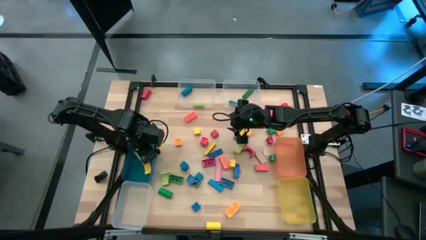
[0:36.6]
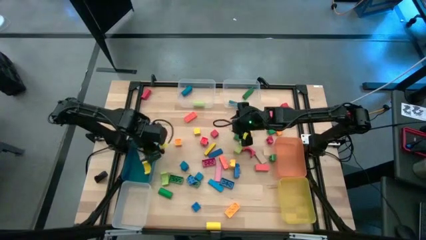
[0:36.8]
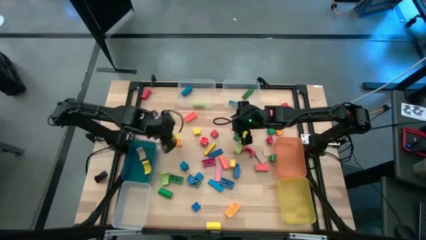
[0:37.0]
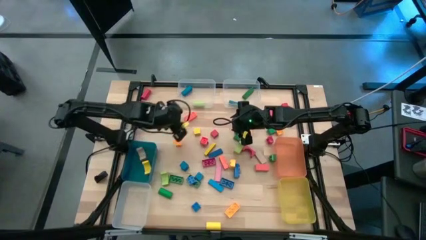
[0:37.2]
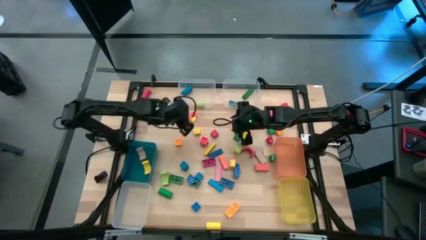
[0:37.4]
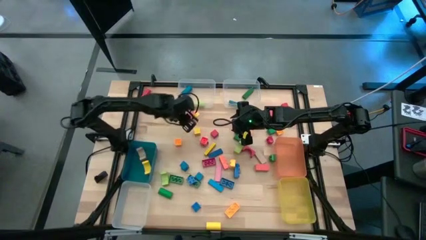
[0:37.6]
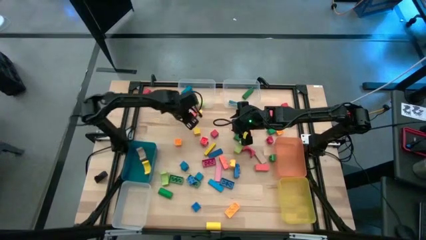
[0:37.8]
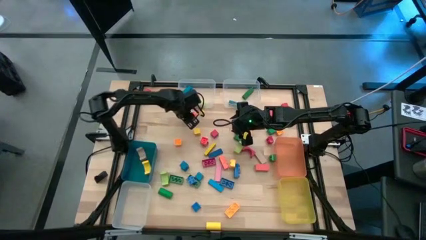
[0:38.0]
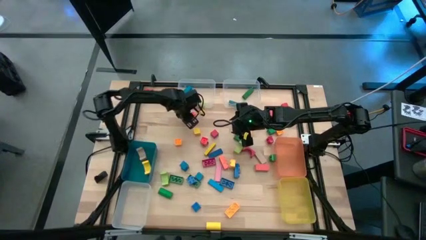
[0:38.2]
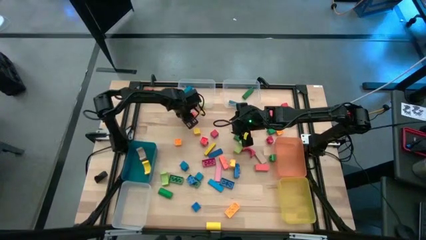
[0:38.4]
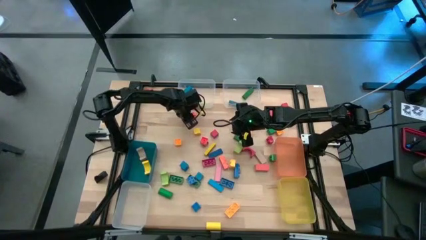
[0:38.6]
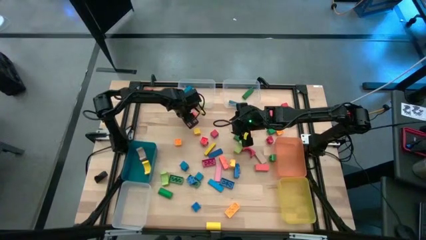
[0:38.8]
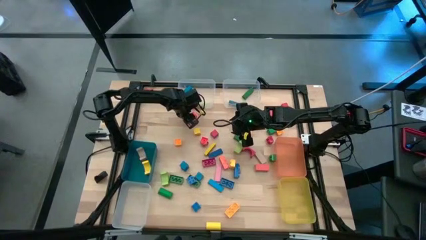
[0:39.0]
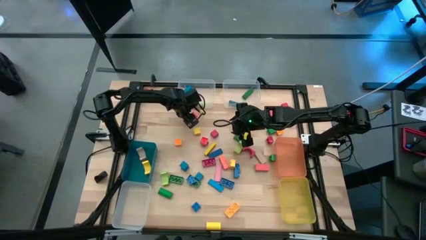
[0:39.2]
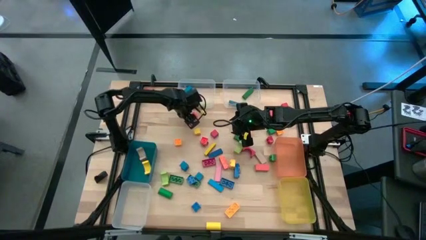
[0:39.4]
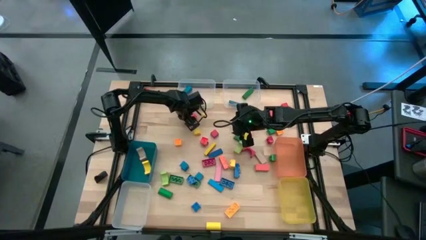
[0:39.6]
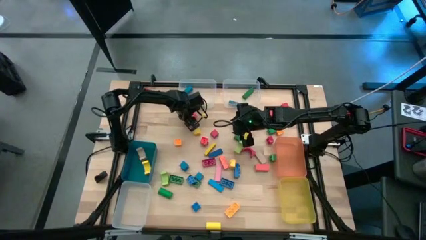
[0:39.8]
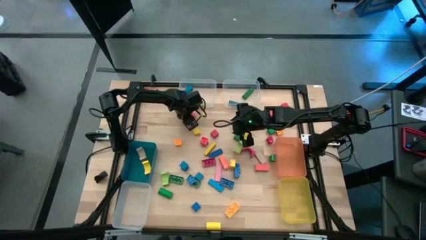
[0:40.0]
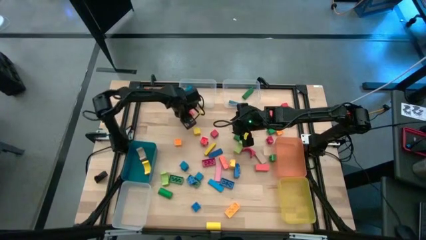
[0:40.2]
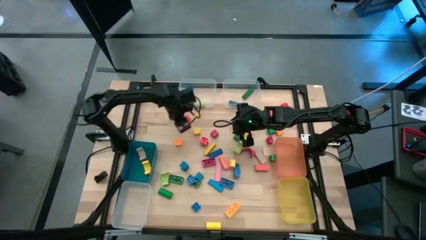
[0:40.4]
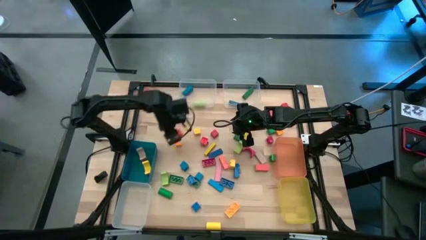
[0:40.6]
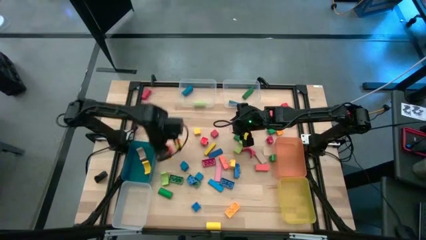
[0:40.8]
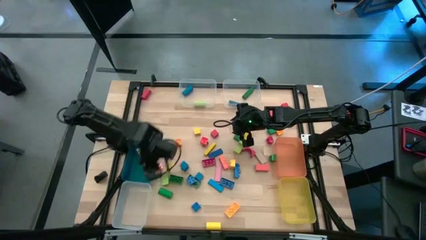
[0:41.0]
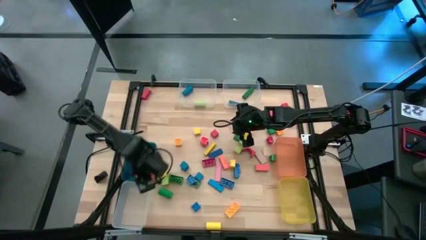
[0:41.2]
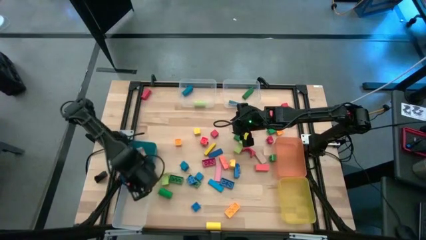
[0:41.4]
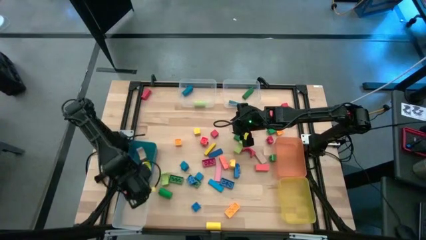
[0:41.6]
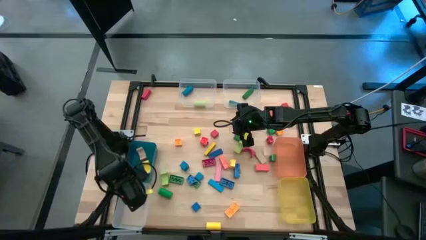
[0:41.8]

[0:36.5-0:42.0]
Task: Sort blocks by size
Put the orange game piece into the bottom left transparent bin

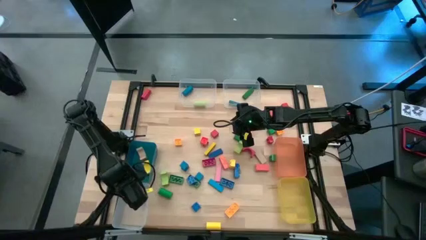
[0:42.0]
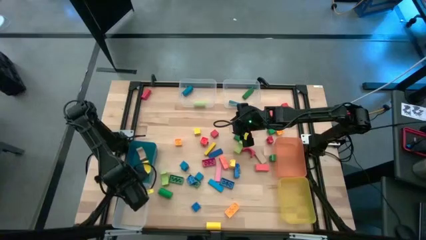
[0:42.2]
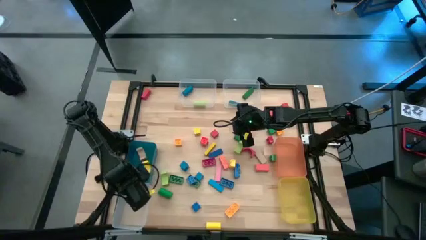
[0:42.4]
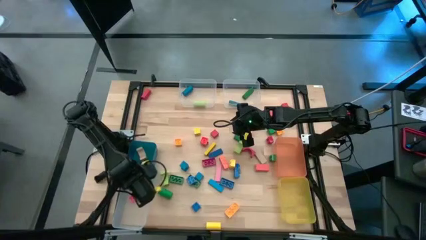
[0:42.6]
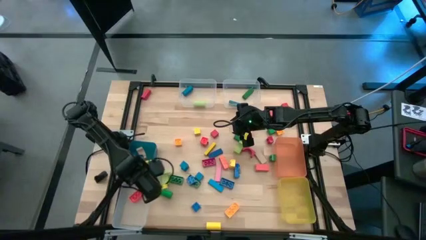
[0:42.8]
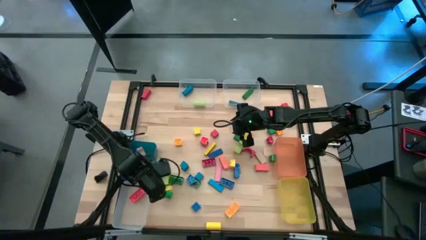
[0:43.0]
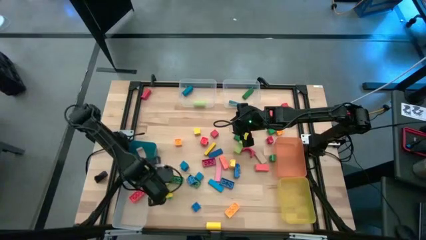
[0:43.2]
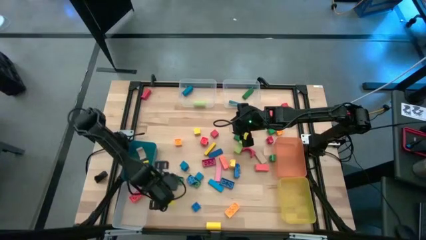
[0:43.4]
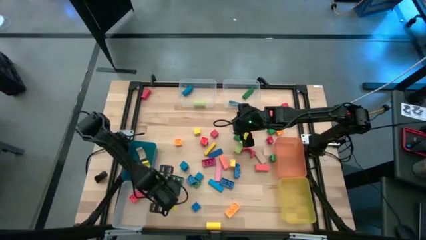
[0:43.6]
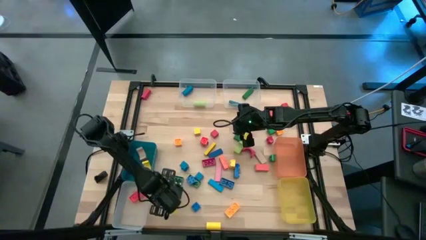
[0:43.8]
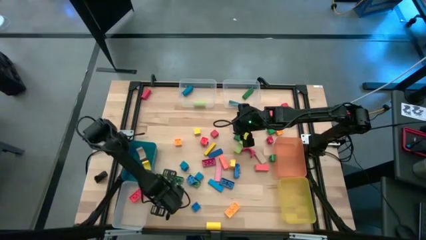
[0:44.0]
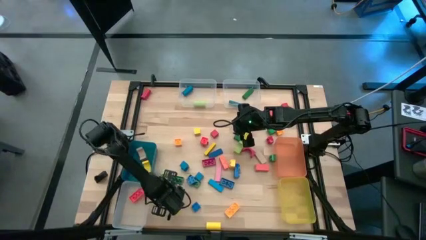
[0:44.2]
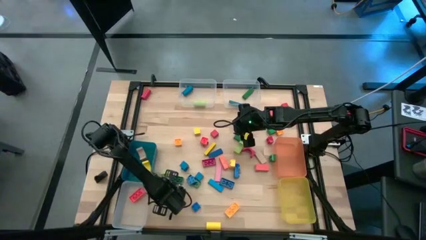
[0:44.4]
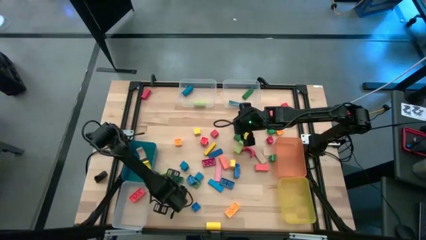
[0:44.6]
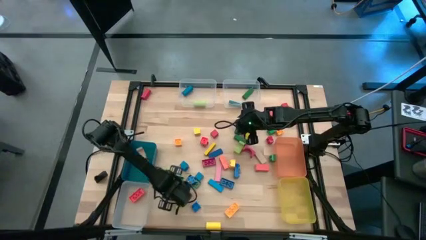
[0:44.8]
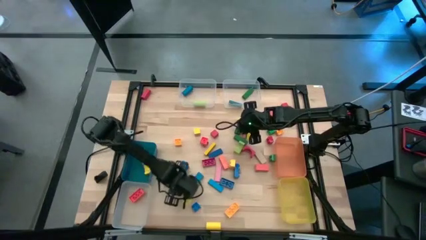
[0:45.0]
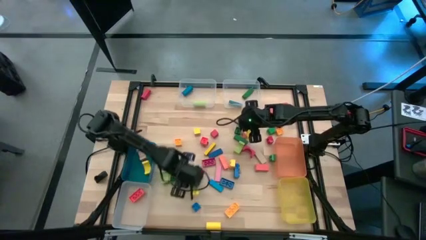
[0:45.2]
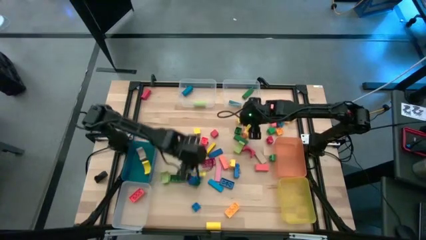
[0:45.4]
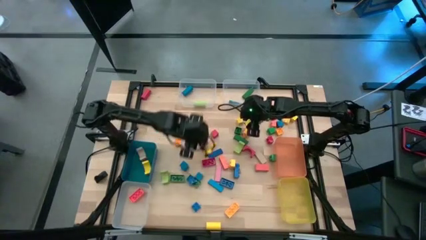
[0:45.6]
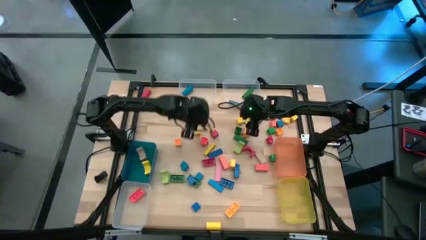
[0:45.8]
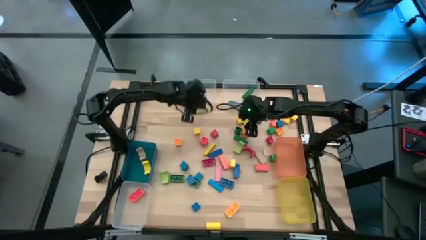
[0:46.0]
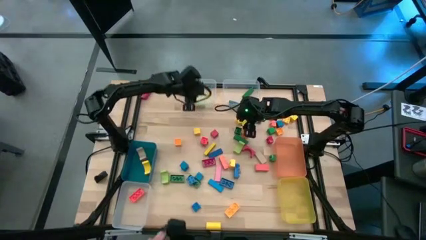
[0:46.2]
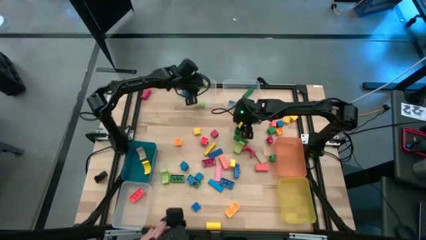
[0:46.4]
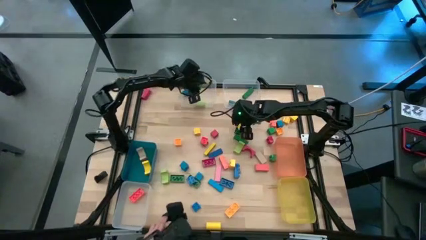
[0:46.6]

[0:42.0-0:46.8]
Put the green block into the top left transparent bin

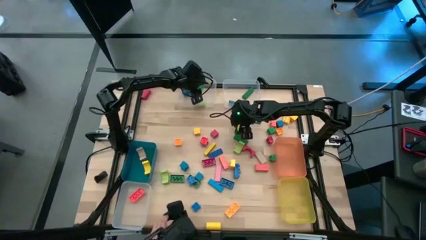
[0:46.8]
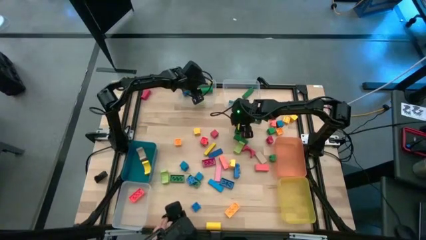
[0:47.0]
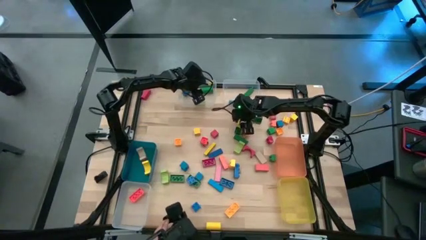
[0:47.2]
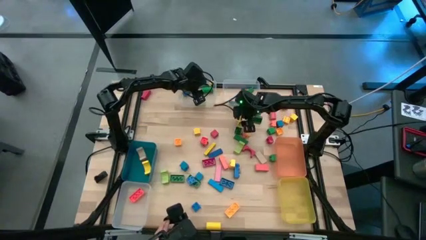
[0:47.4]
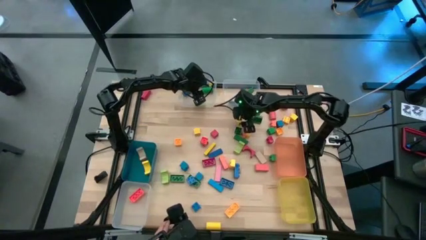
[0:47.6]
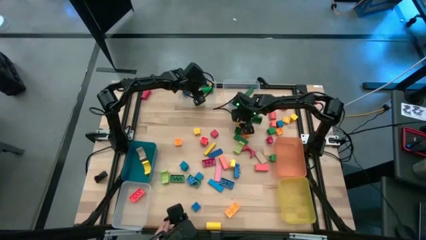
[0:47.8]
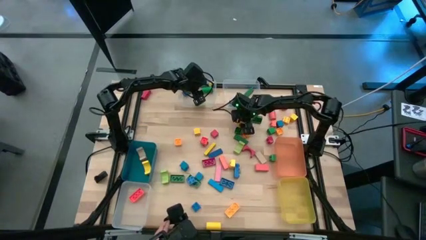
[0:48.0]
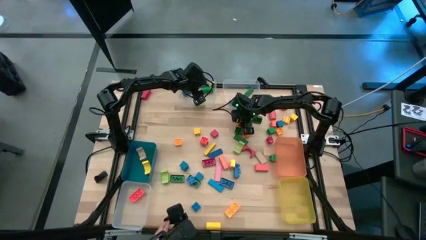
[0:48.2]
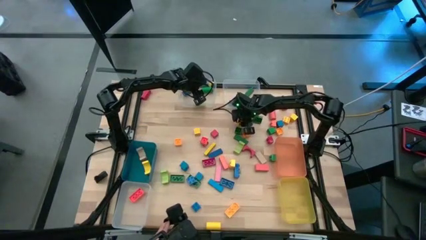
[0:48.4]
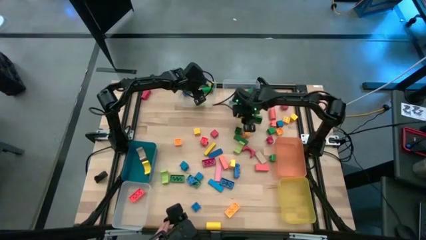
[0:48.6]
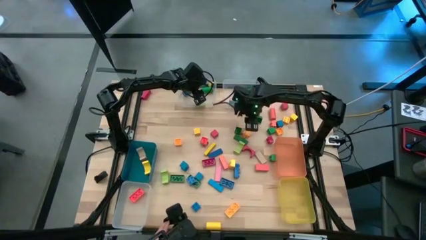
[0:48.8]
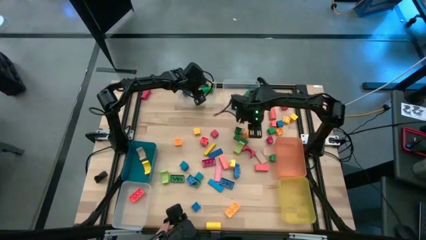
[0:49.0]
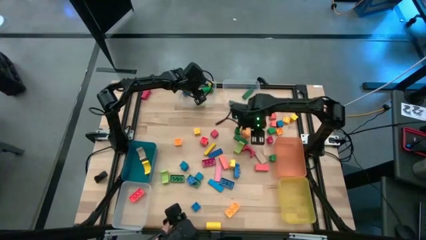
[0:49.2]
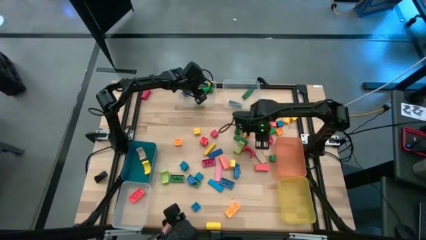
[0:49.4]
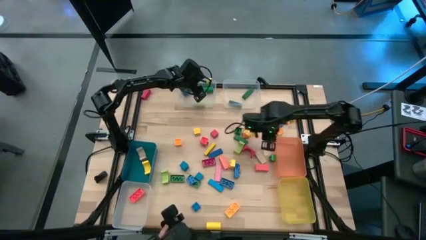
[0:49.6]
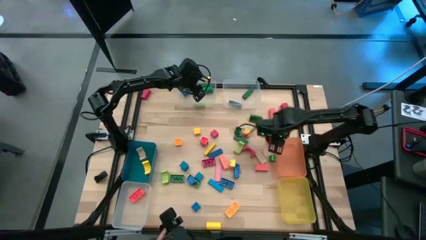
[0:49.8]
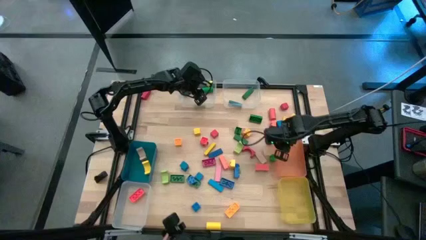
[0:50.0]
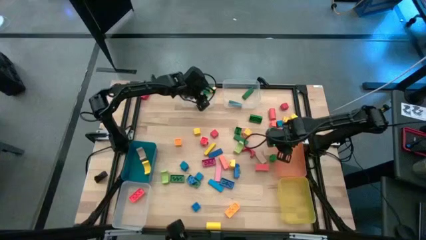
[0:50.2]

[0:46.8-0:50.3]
Put the yellow block into the orange bin

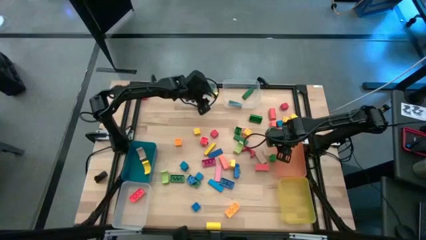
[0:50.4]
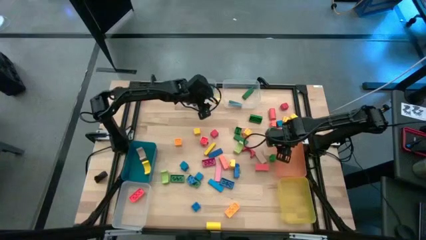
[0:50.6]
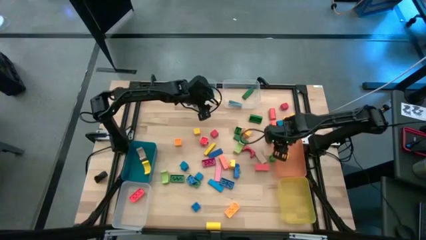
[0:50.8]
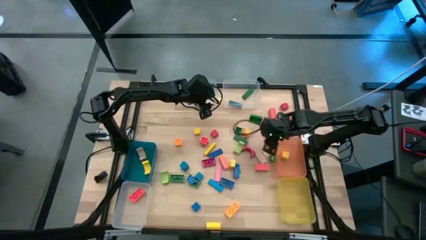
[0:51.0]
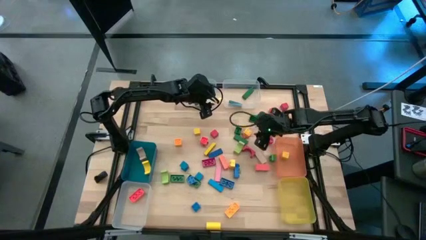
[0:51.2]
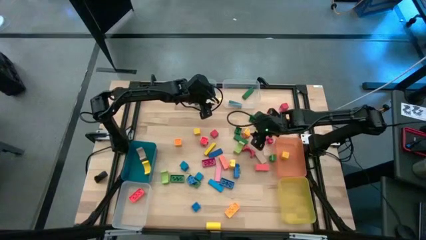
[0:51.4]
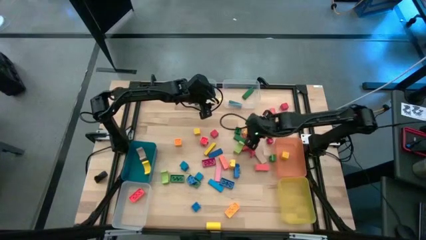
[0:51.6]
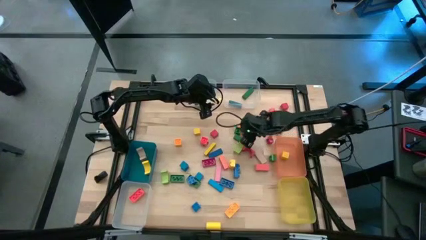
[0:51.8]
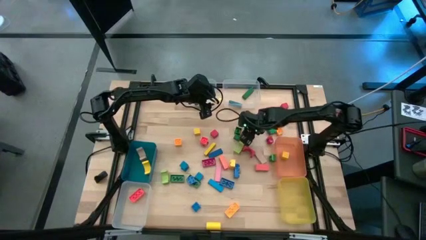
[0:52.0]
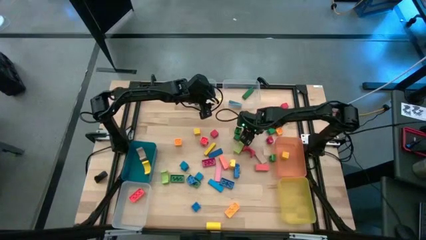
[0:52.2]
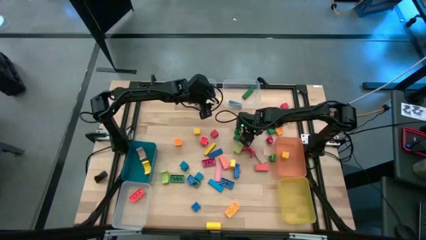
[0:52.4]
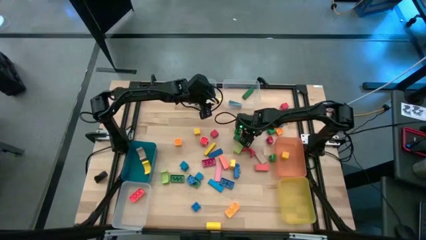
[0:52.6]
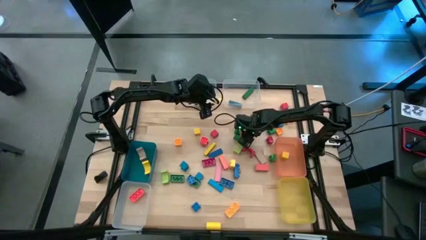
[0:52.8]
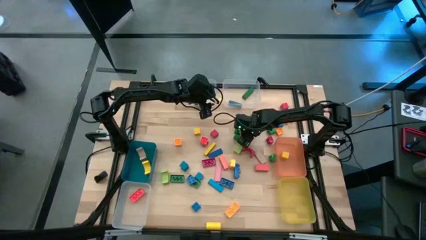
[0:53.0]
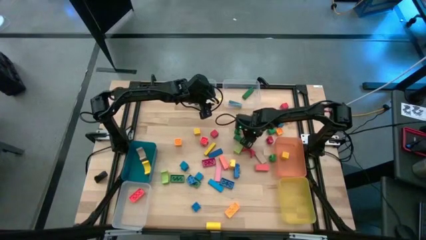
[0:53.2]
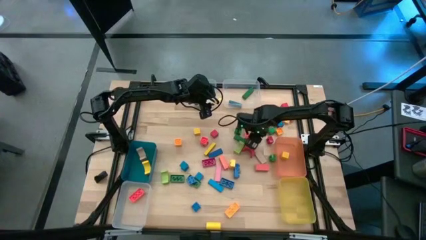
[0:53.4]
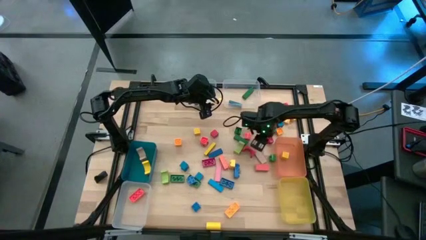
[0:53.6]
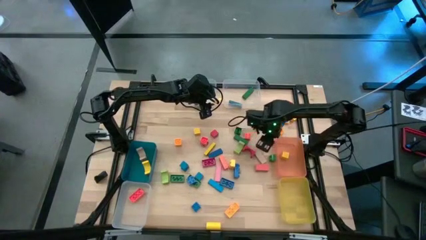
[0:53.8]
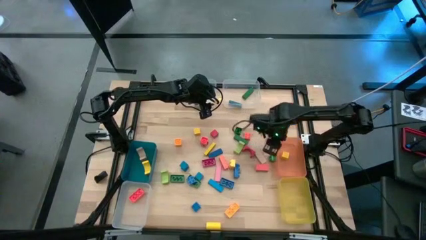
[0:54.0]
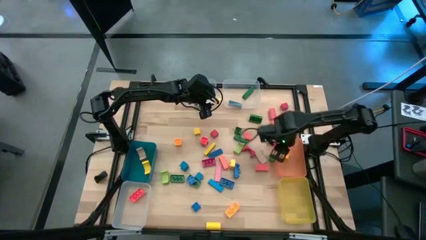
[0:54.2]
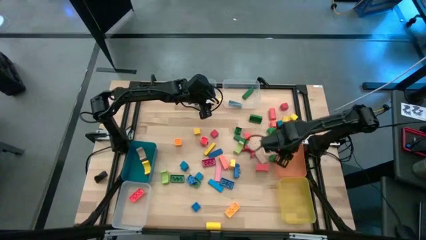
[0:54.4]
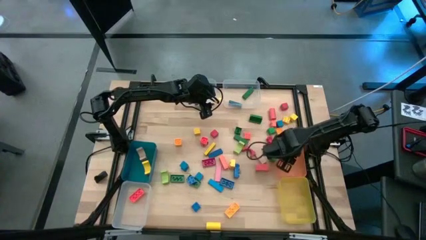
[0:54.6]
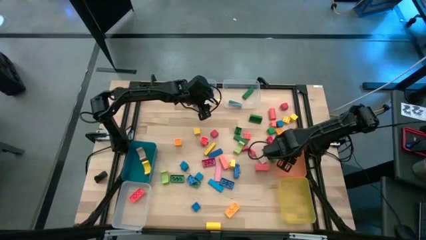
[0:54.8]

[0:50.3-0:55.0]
Put the yellow game piece into the orange bin
